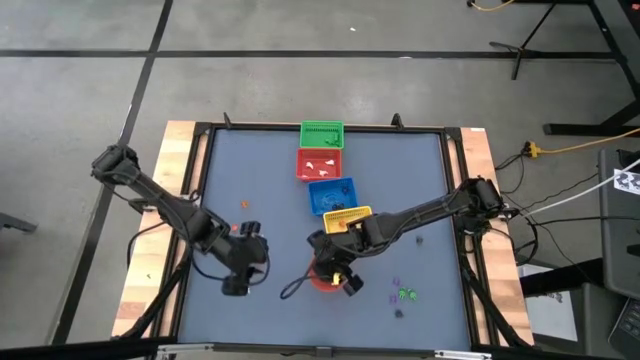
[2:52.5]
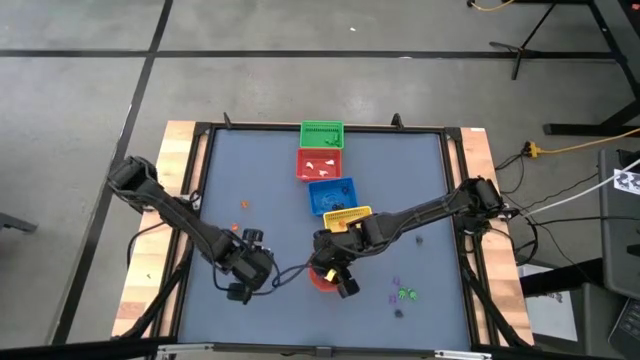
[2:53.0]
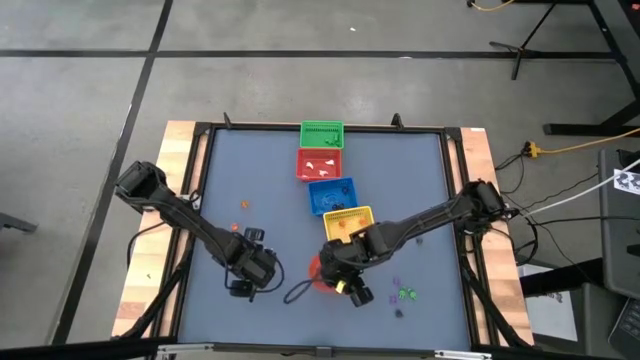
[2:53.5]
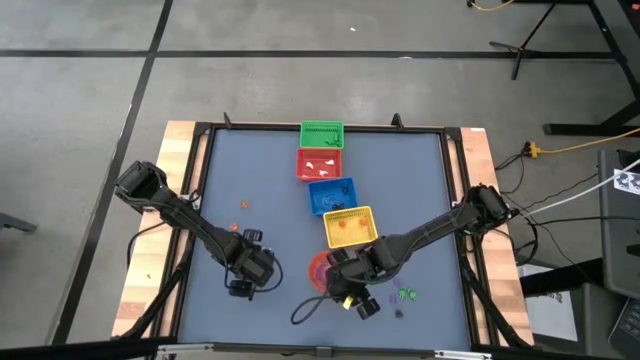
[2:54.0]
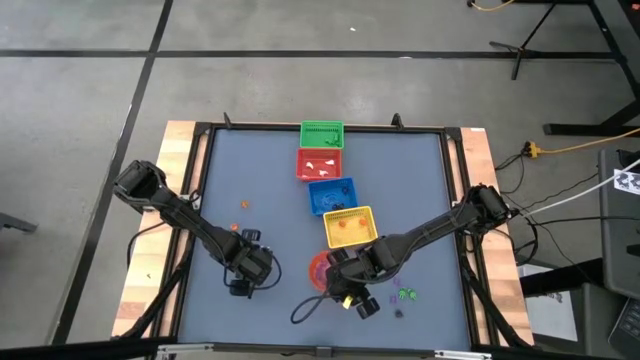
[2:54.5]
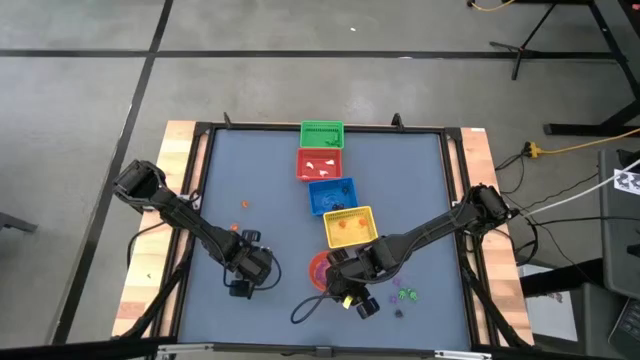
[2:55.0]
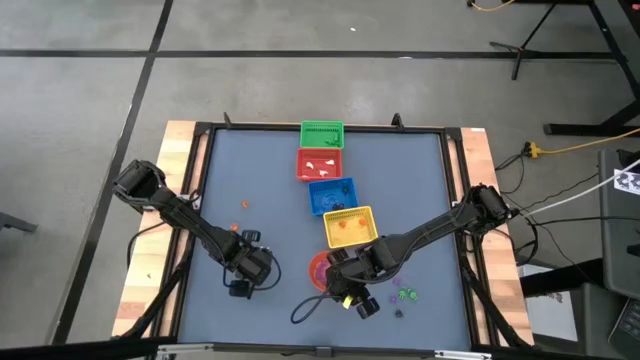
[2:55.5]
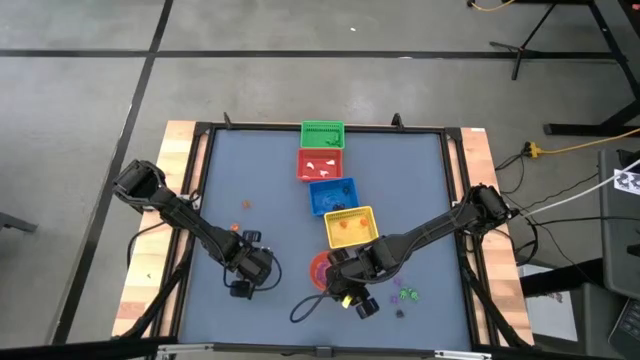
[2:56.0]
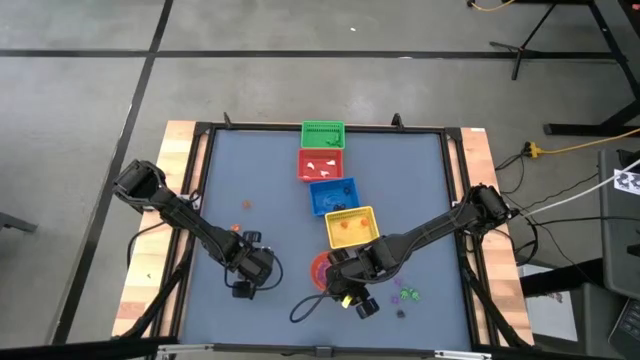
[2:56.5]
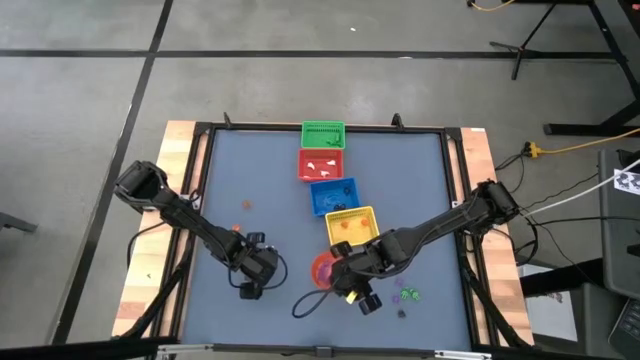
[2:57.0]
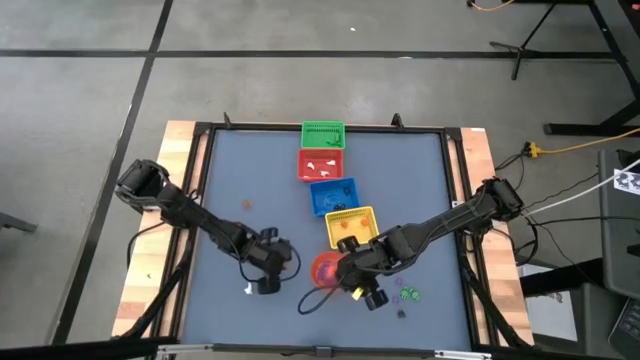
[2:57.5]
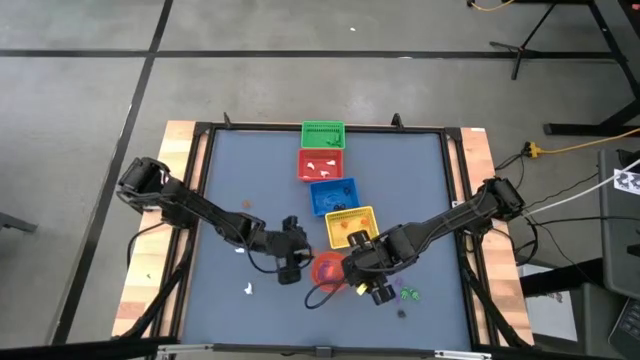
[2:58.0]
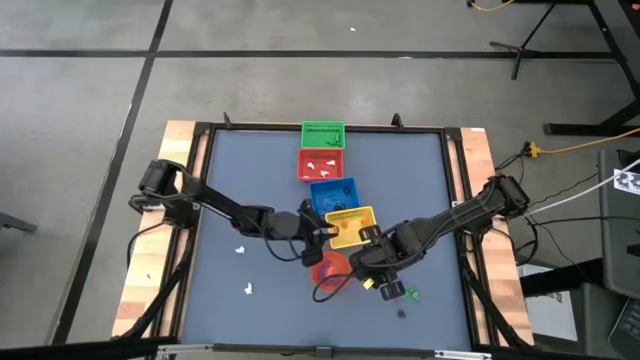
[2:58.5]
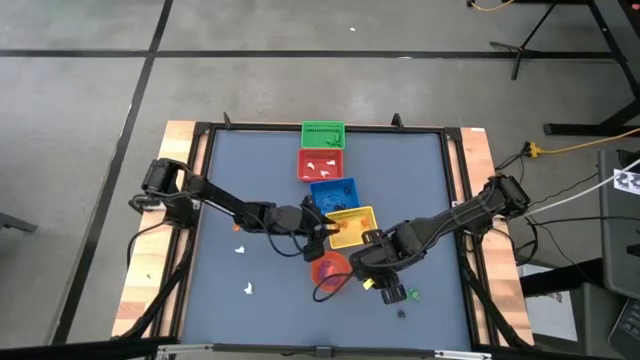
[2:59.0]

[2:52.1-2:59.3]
Task: Sort Halloween decoration
Put the orange pumpkin toy into the yellow bin

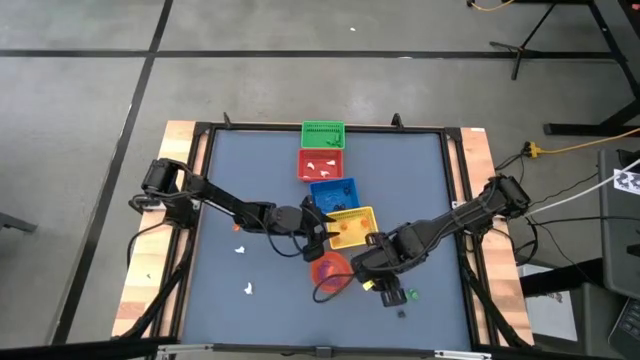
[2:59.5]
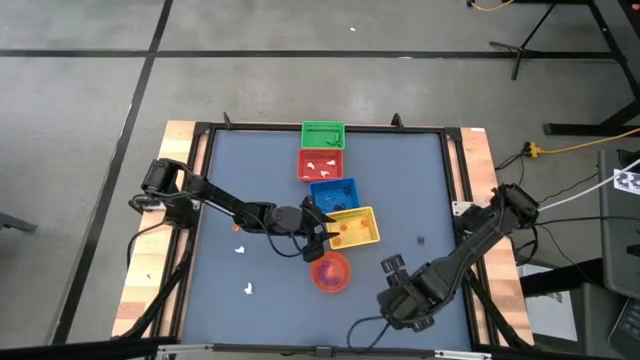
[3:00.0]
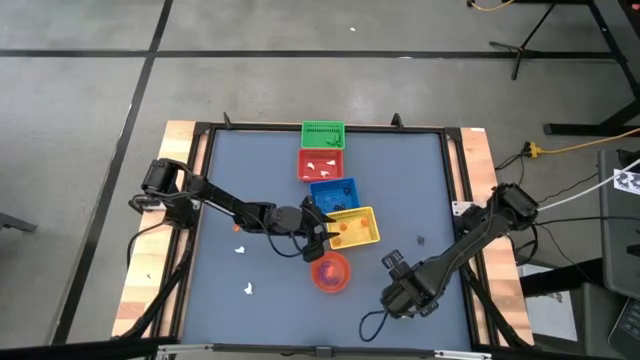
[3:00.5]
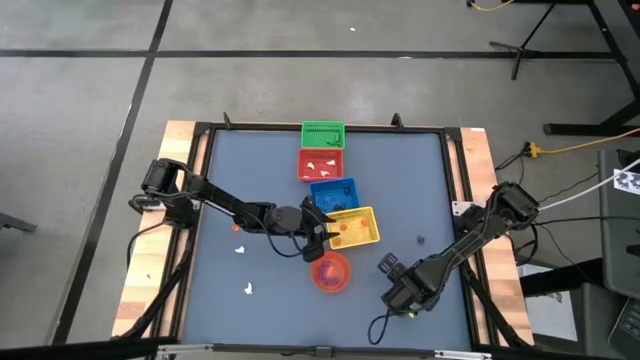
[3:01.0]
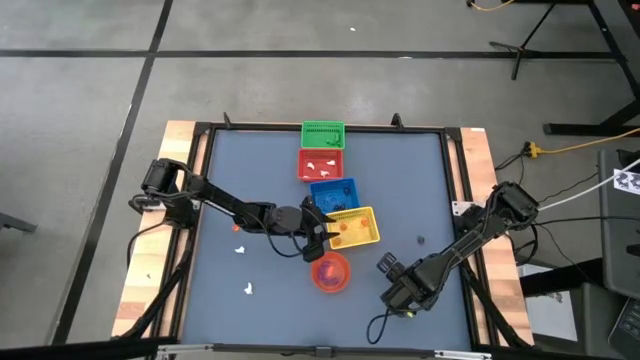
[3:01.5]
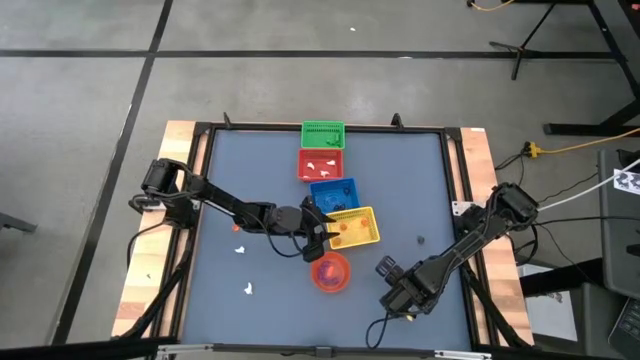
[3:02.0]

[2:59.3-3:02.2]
Put the purple spider toy into the orange bin

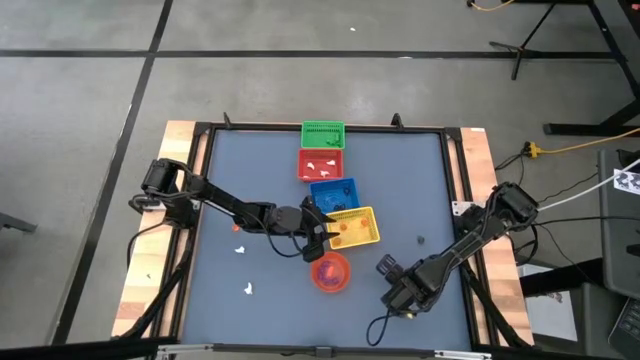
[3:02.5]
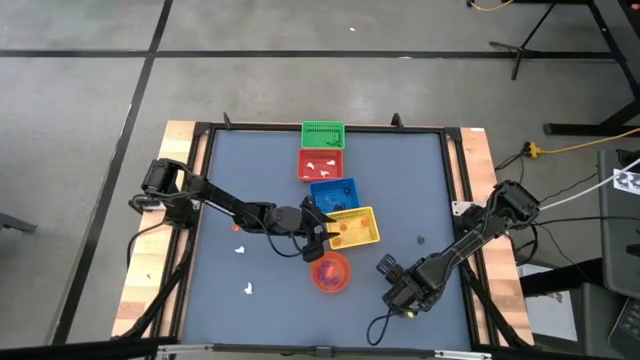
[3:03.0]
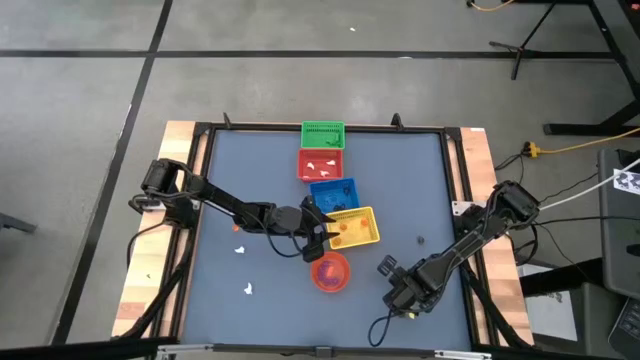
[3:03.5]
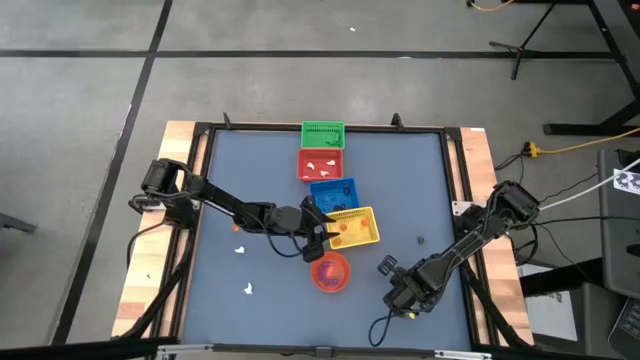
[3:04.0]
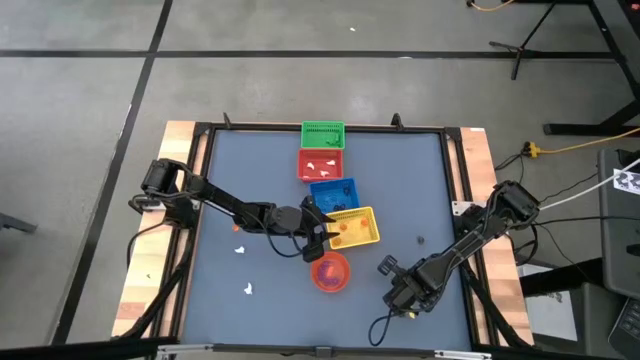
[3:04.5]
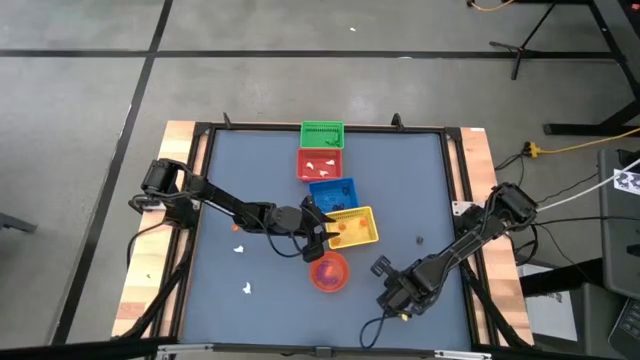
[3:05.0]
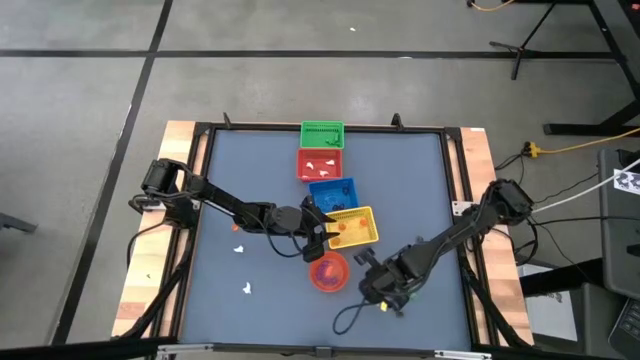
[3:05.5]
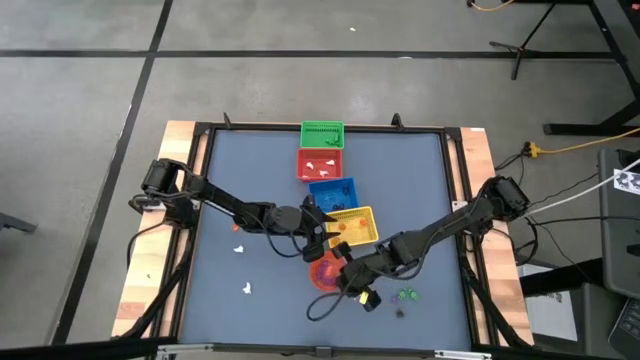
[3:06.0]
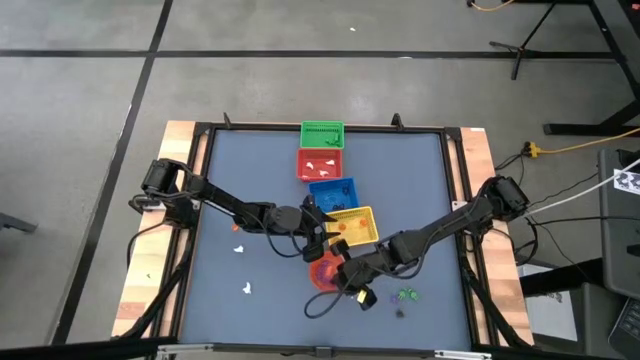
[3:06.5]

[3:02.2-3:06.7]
Put the purple spider toy into the orange bin

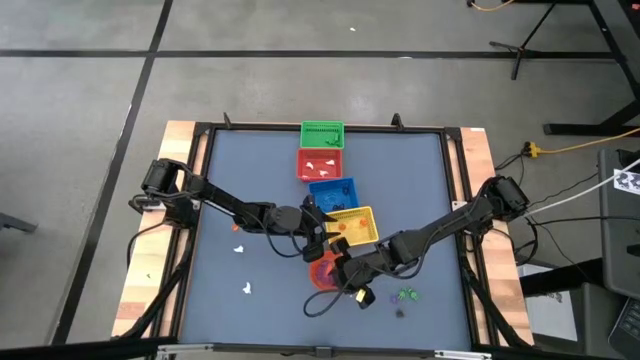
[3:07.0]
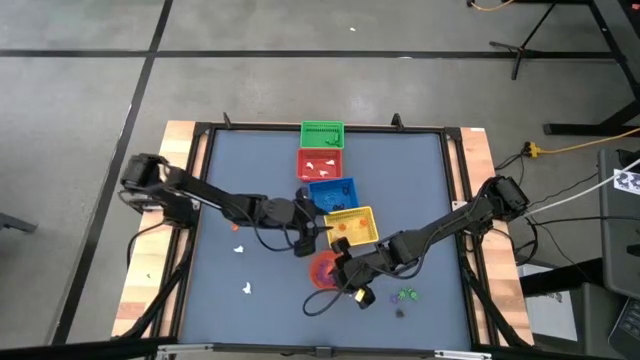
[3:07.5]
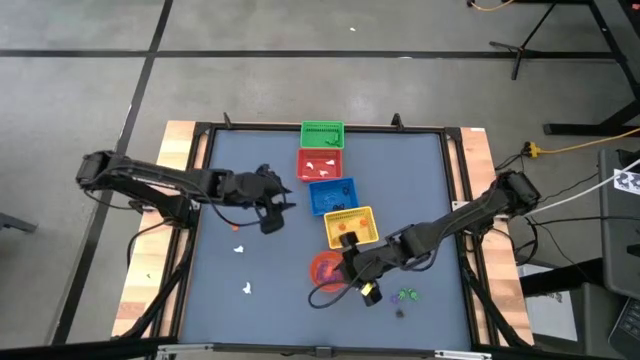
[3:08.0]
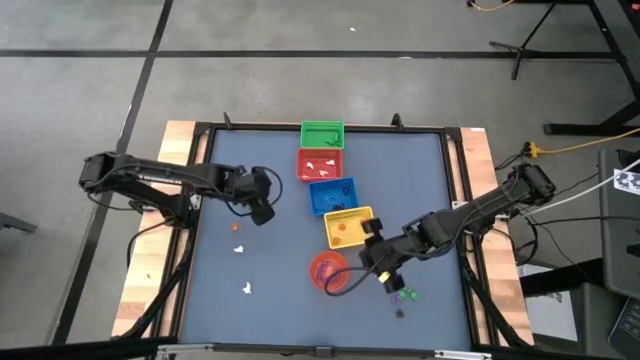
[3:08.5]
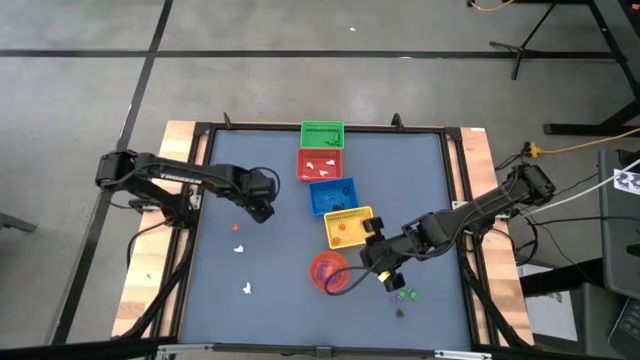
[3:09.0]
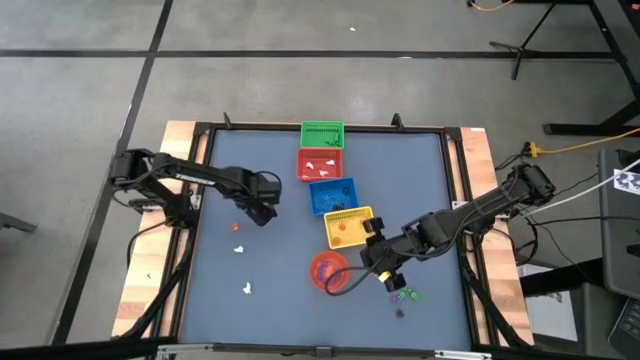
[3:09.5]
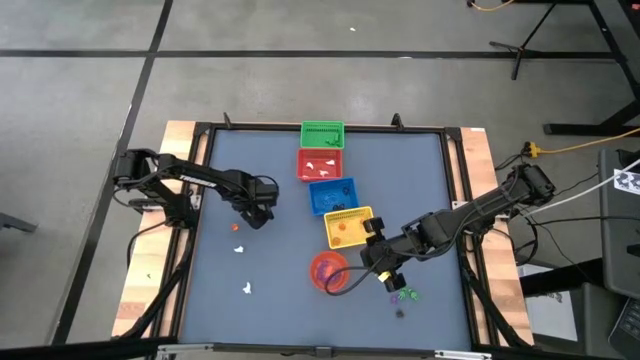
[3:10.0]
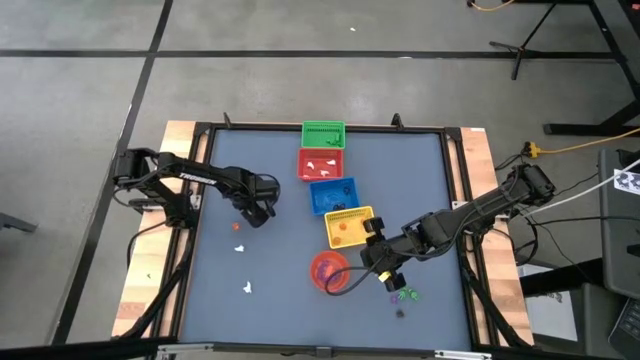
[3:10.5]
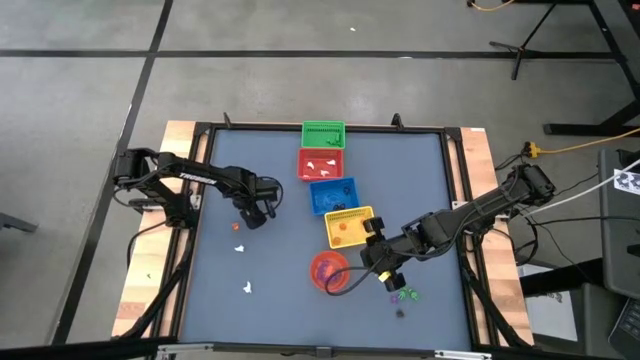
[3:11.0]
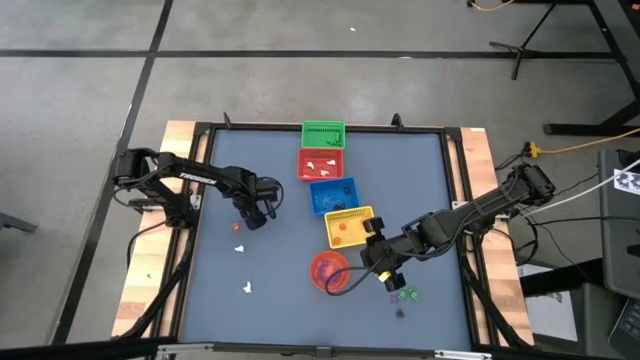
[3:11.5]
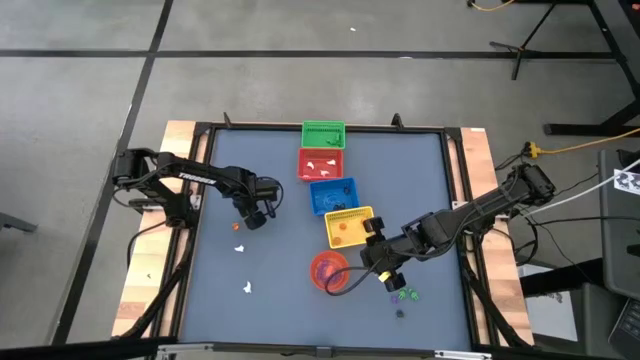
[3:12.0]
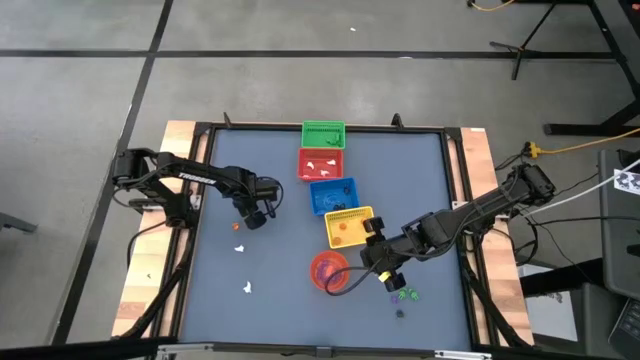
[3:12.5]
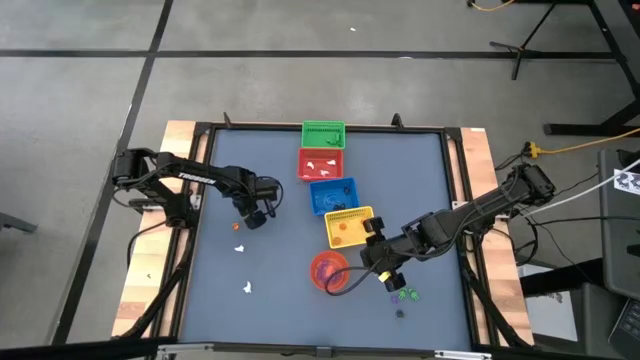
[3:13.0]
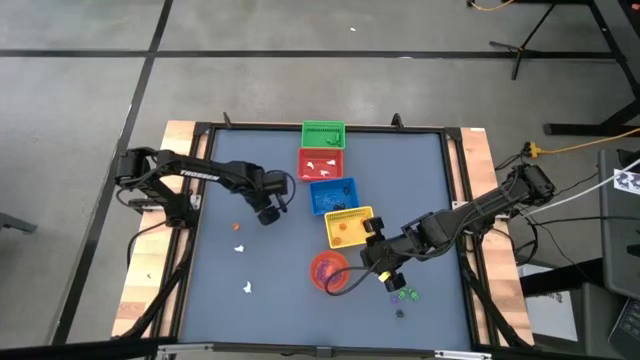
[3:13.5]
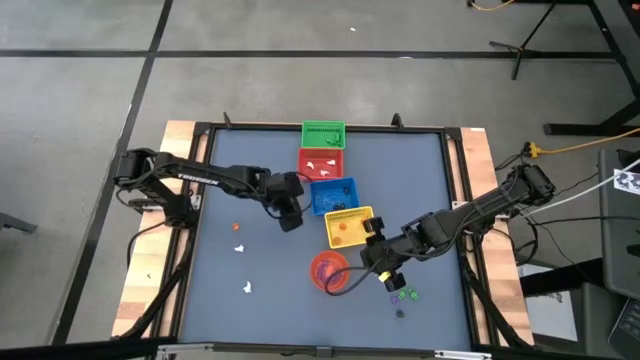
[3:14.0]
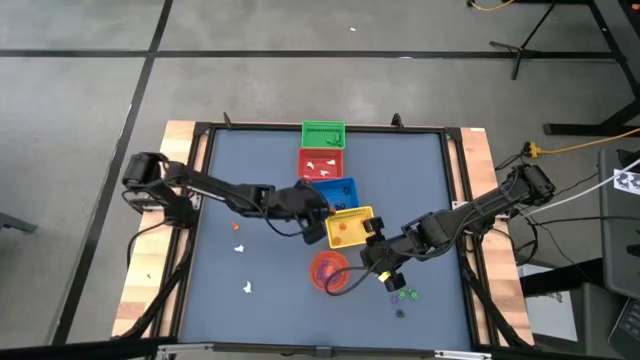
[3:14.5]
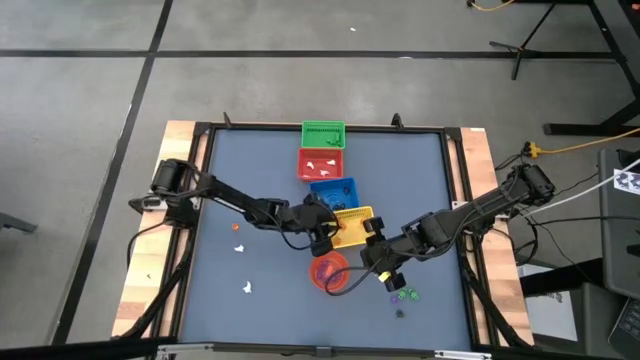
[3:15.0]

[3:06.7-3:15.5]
Put the pumpkin into the yellow bin
